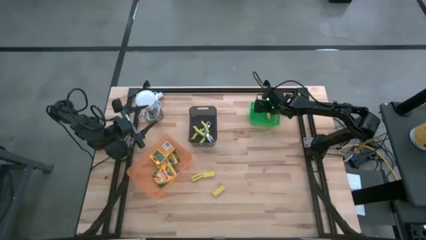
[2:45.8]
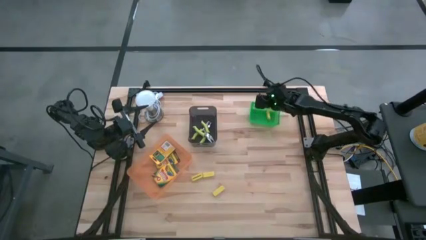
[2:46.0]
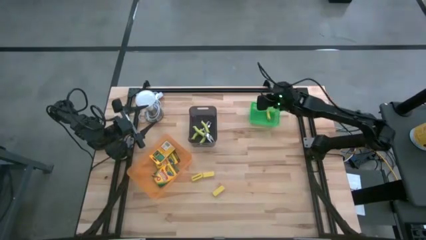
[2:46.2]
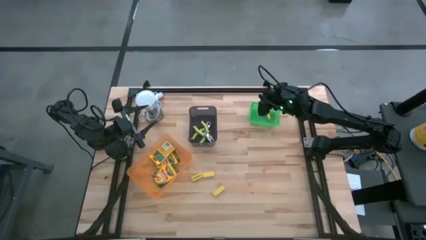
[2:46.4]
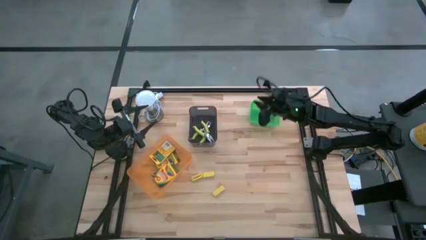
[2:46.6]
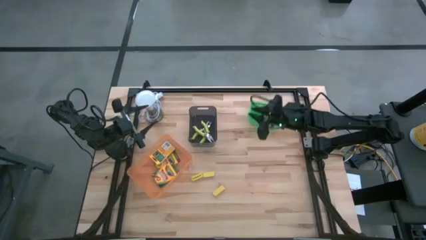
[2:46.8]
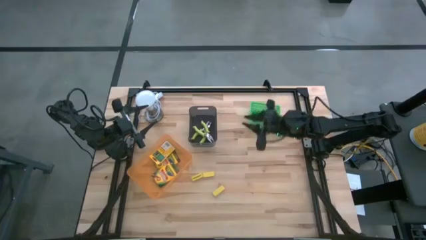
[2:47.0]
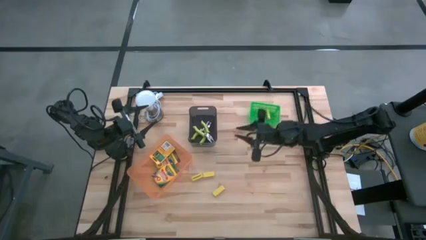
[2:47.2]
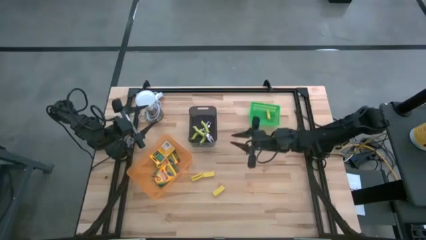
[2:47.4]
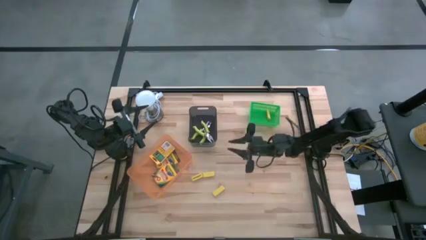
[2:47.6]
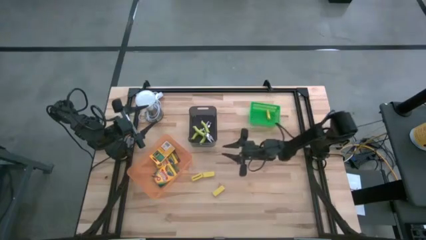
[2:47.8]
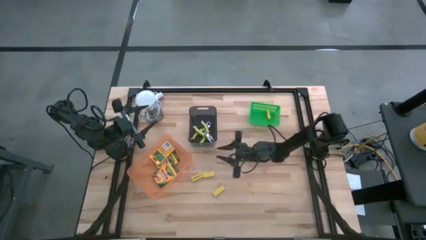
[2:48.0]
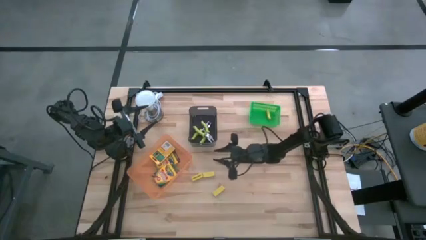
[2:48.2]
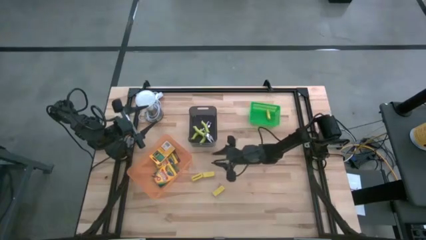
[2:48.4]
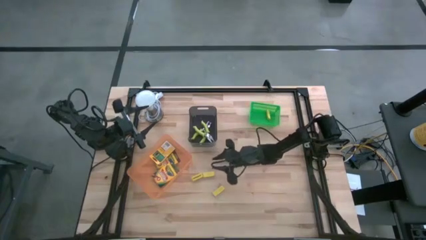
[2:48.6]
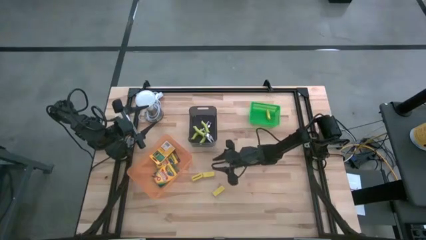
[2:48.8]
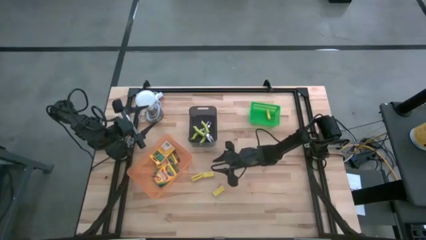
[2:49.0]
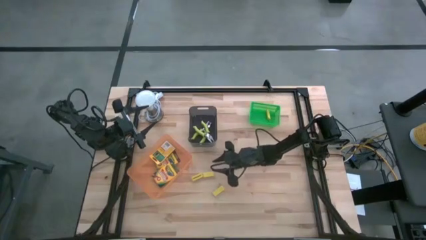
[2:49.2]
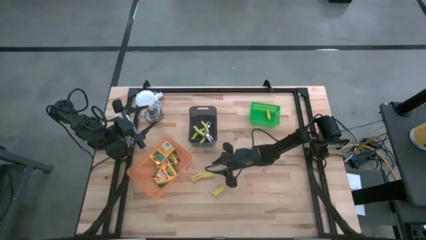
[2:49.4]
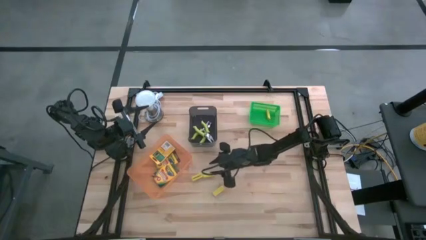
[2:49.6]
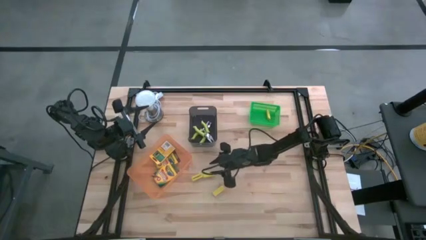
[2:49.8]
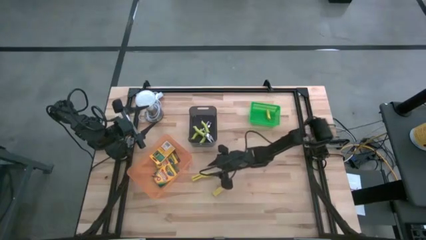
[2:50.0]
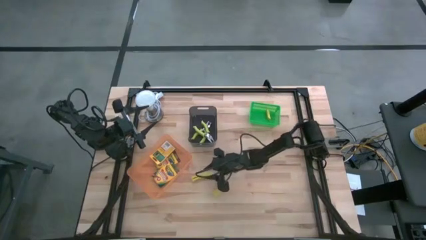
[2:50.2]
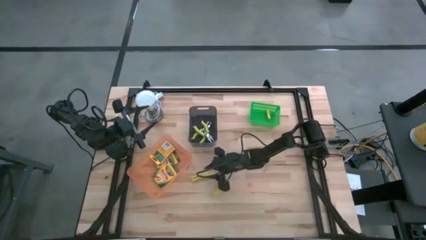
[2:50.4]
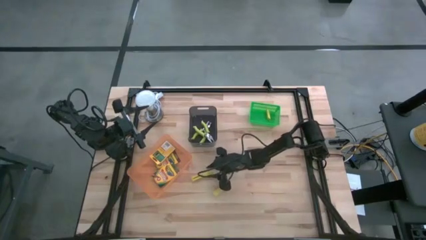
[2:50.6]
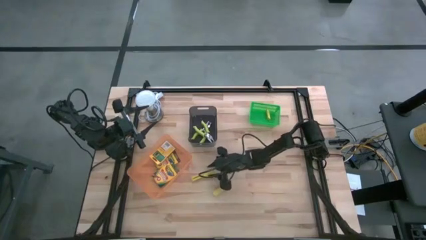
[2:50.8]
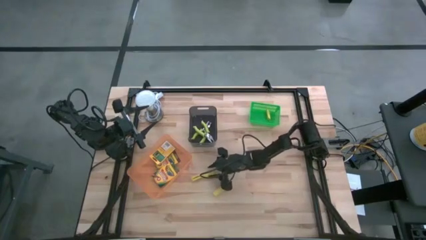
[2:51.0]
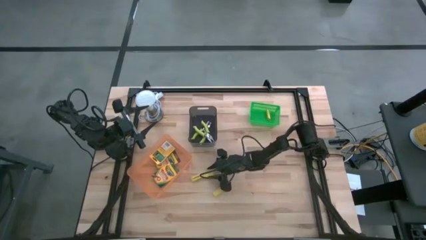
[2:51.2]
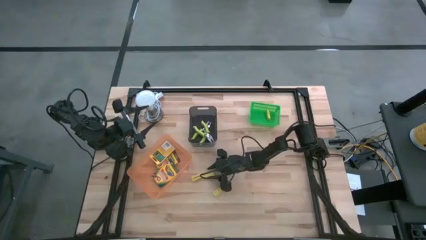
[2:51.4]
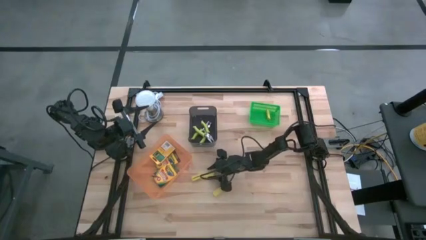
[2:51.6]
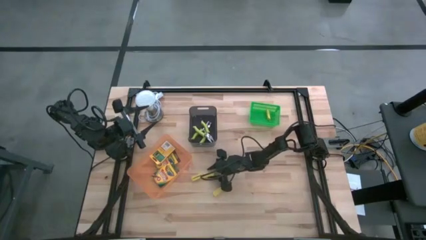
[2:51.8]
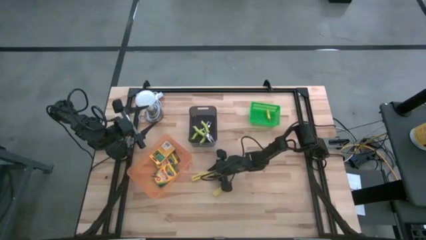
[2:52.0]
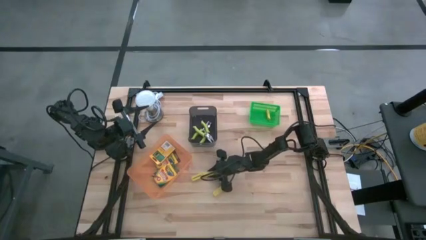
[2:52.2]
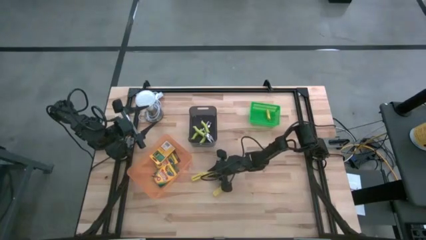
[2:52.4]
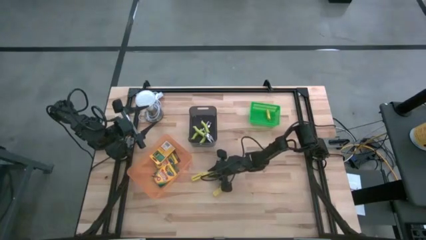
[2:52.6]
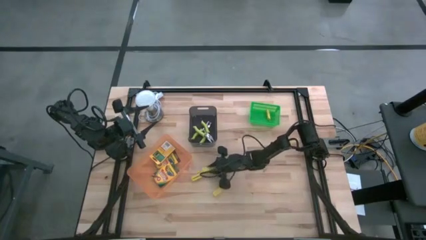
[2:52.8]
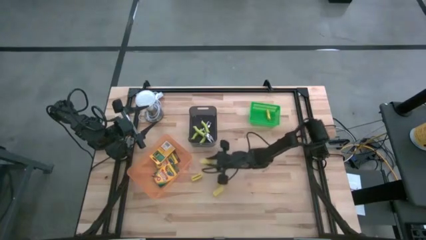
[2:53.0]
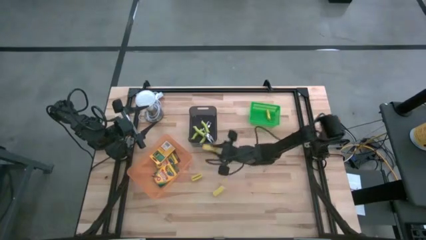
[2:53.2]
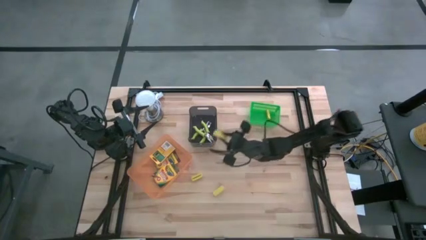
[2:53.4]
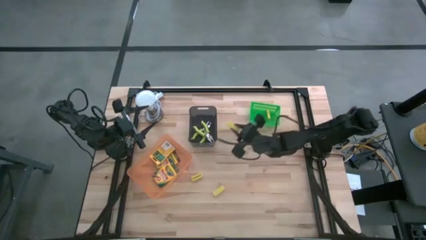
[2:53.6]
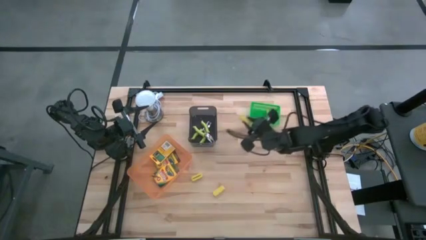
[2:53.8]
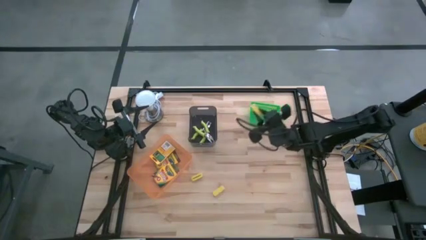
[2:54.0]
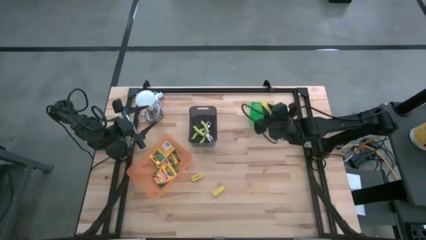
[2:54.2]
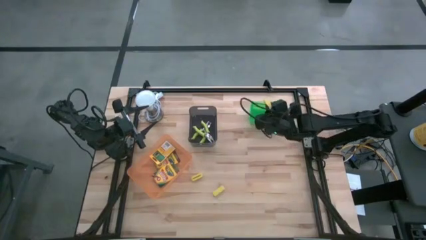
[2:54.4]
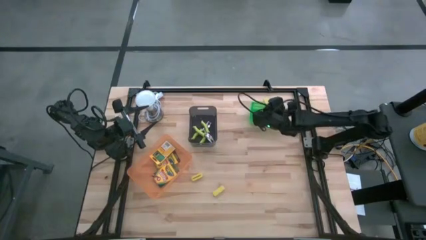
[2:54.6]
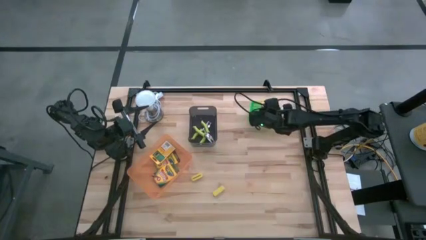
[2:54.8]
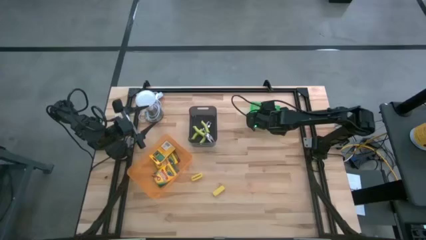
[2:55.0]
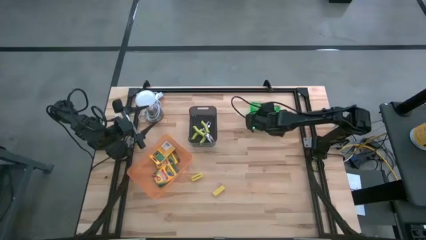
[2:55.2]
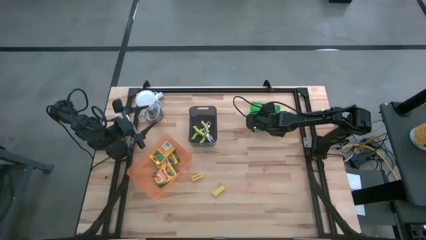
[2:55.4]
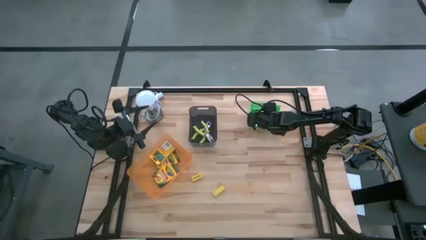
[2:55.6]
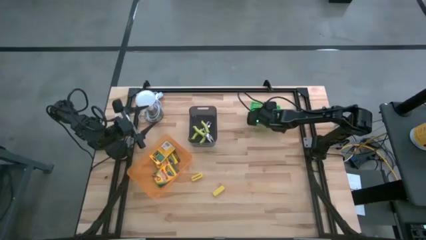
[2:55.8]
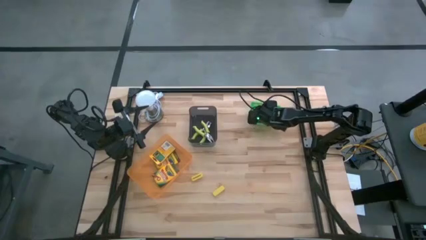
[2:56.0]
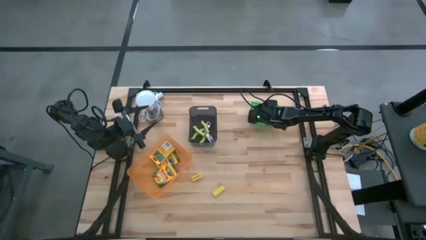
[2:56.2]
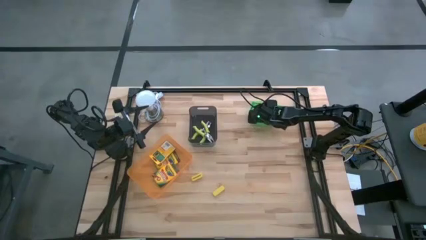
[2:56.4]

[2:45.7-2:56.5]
Task: Pick & Place School Supplies
Put the yellow eraser into the green bin
